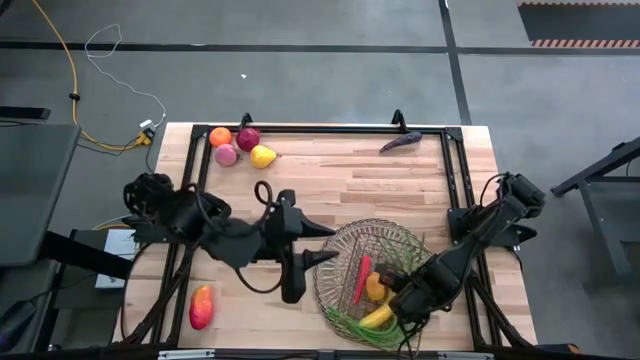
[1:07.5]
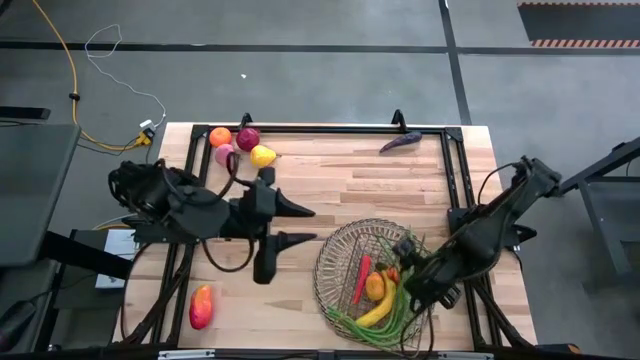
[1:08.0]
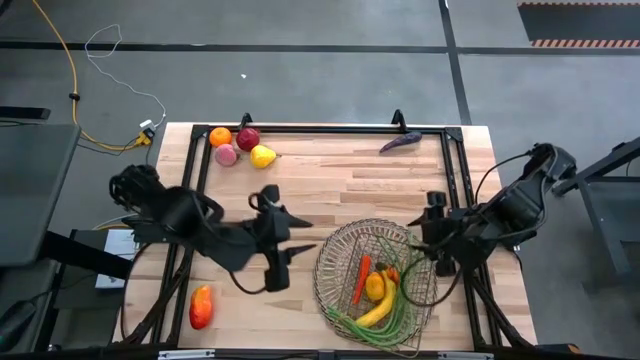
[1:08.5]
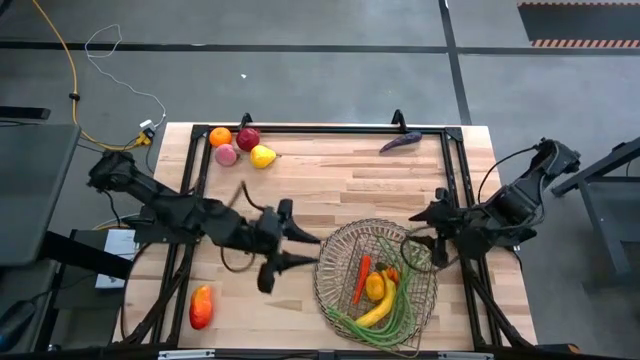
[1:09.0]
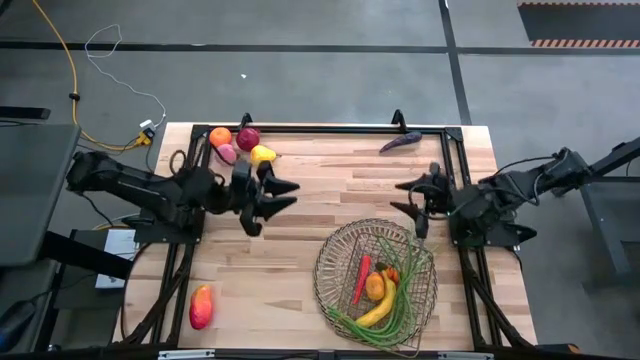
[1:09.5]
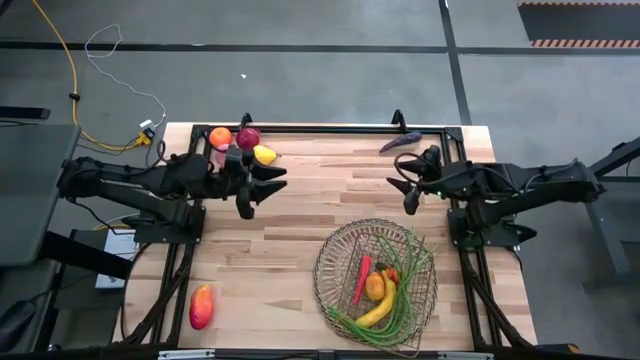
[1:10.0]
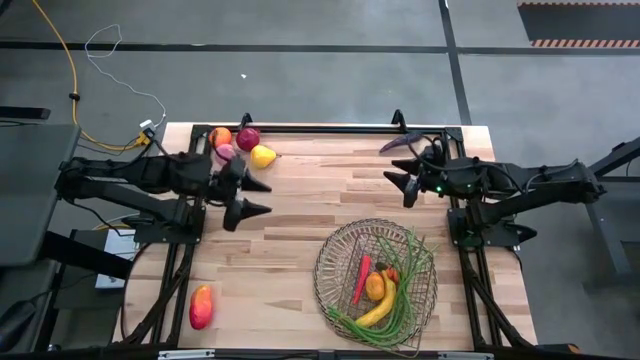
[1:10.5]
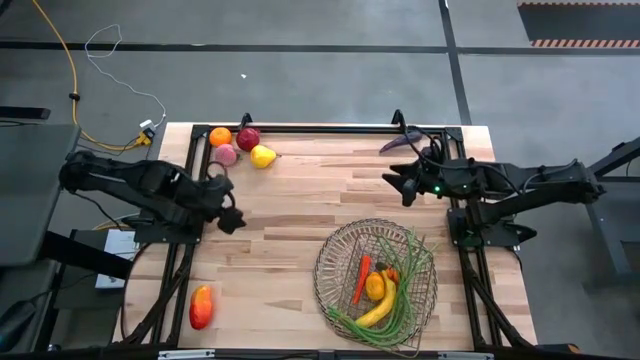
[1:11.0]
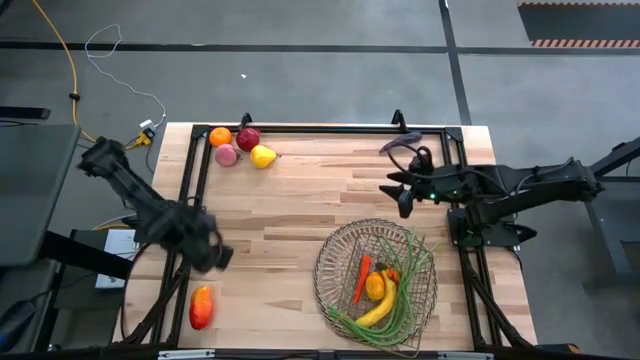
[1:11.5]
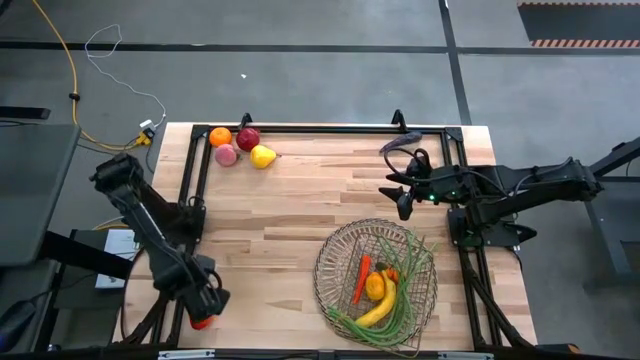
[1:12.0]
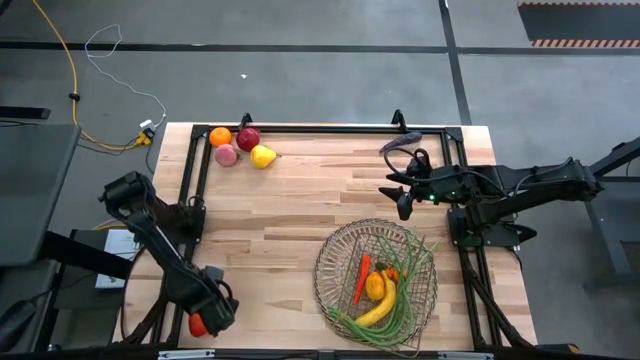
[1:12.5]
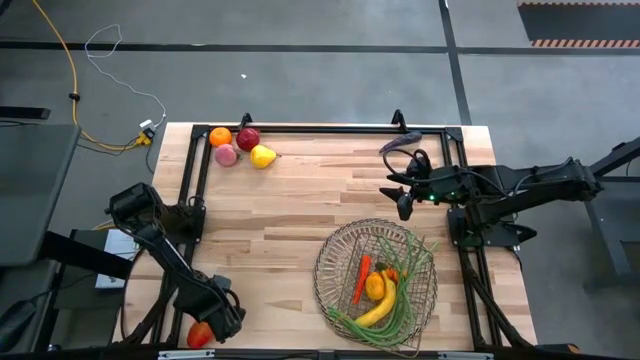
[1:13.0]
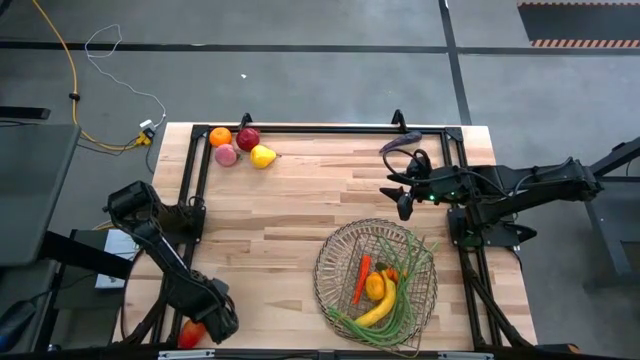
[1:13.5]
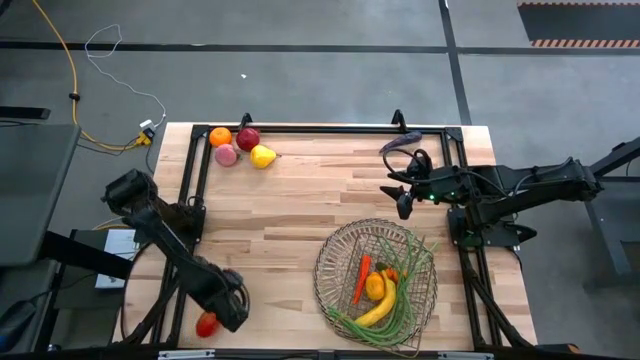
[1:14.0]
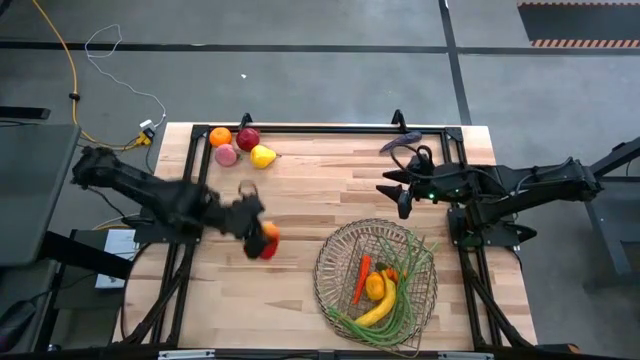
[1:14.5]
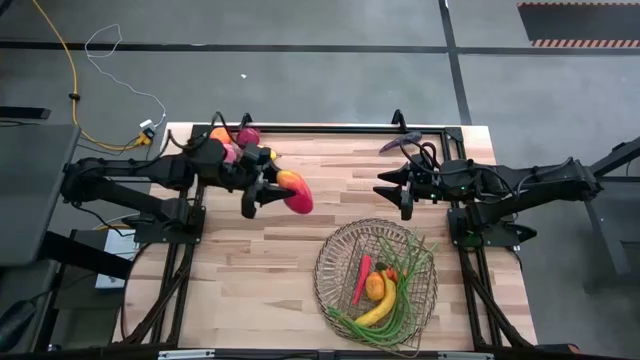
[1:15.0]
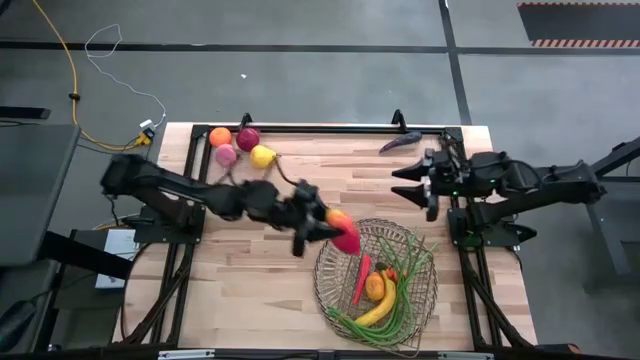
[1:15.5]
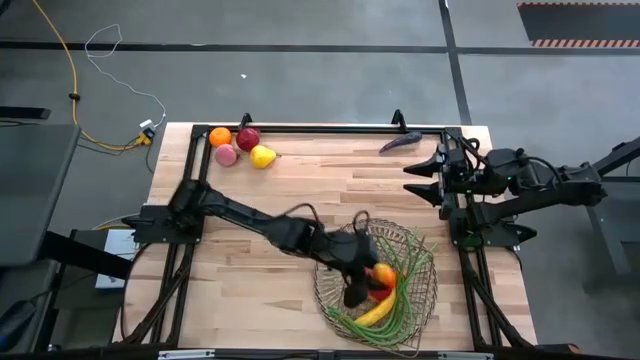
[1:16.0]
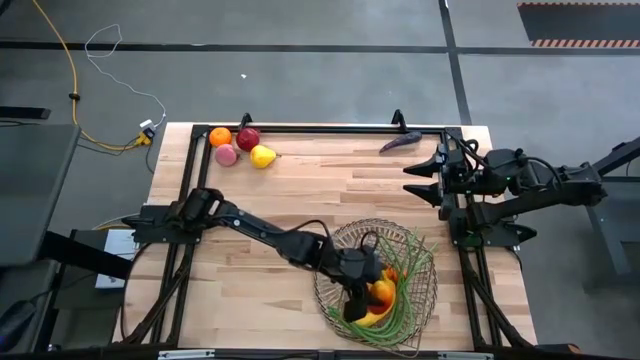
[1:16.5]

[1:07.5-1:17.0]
Task: Build produce basket
Put the mango into the wire basket

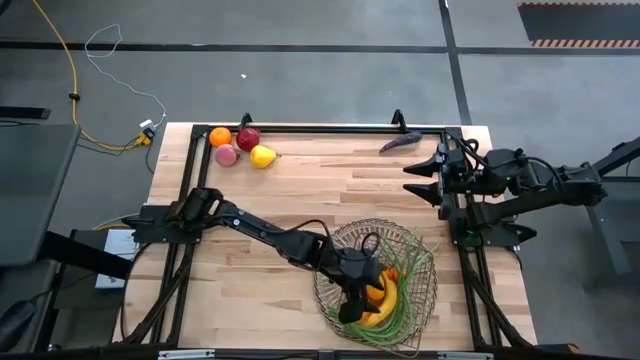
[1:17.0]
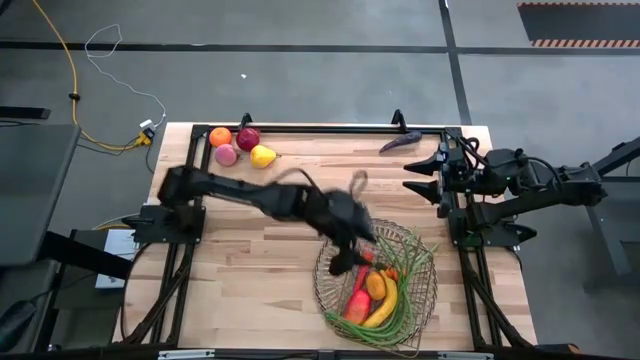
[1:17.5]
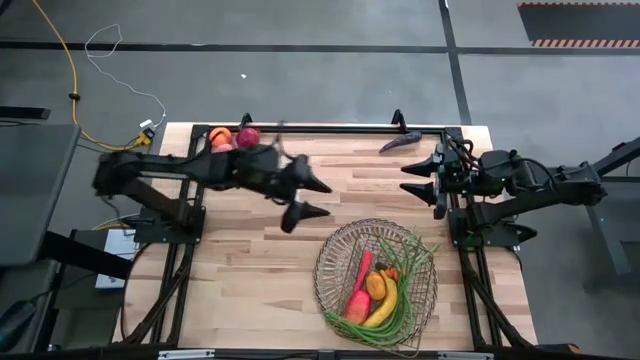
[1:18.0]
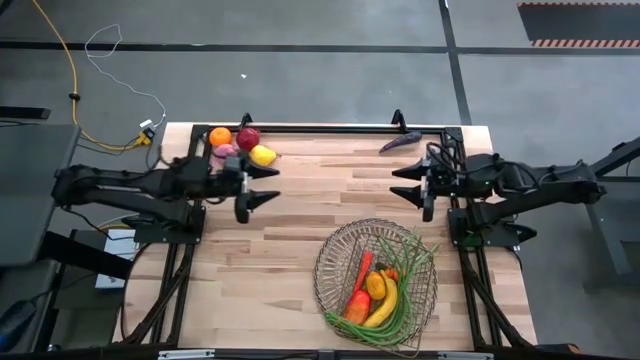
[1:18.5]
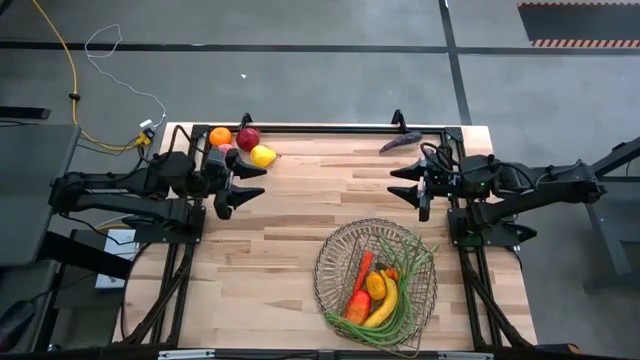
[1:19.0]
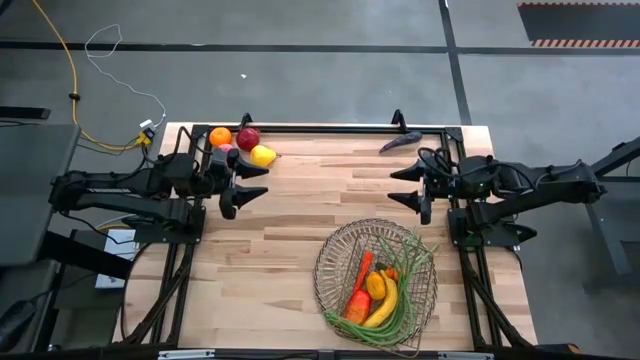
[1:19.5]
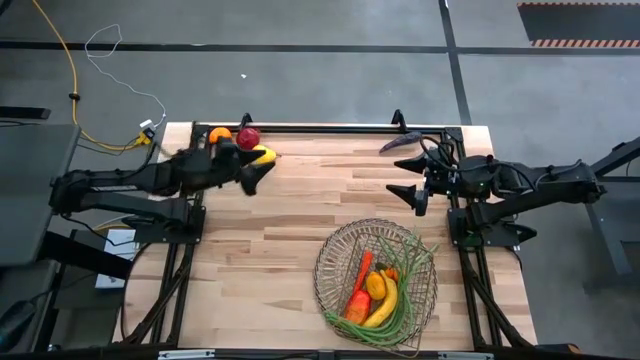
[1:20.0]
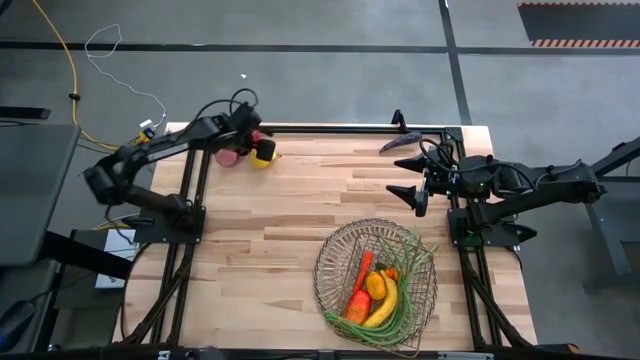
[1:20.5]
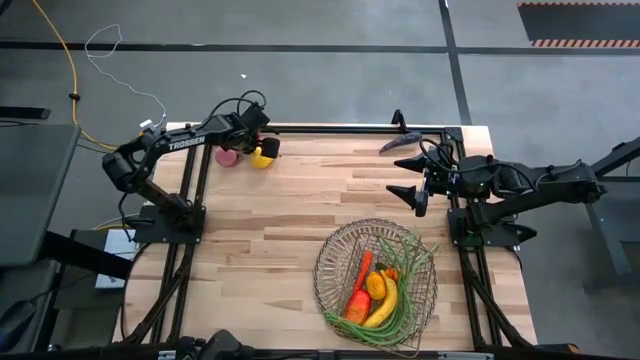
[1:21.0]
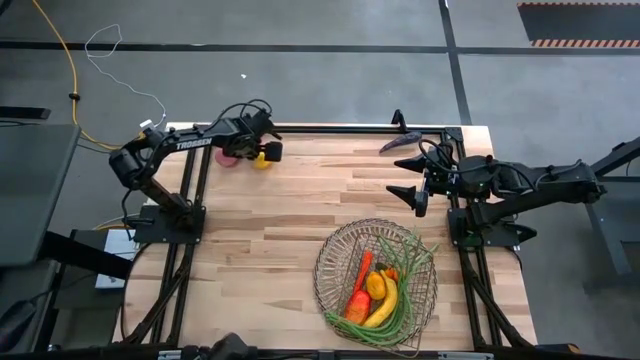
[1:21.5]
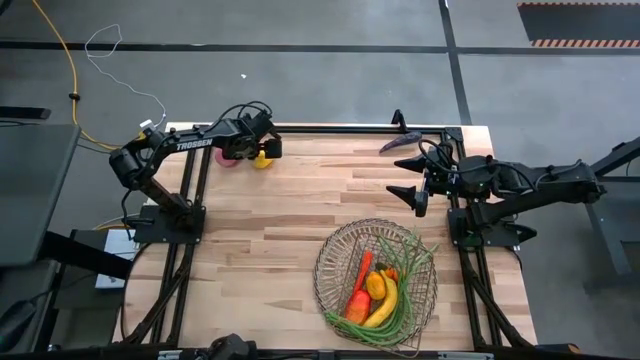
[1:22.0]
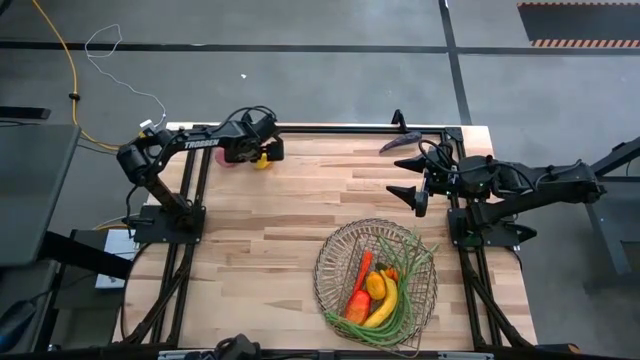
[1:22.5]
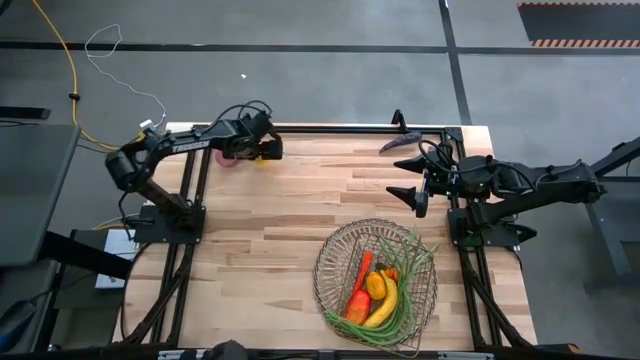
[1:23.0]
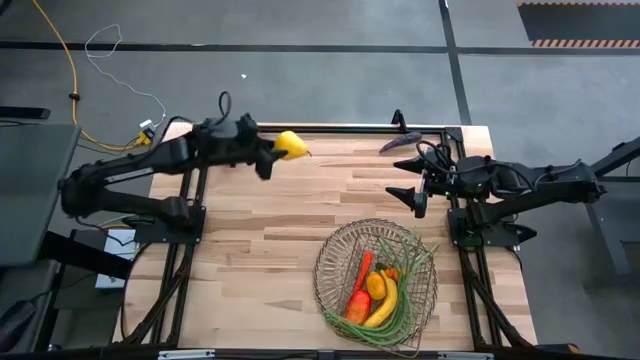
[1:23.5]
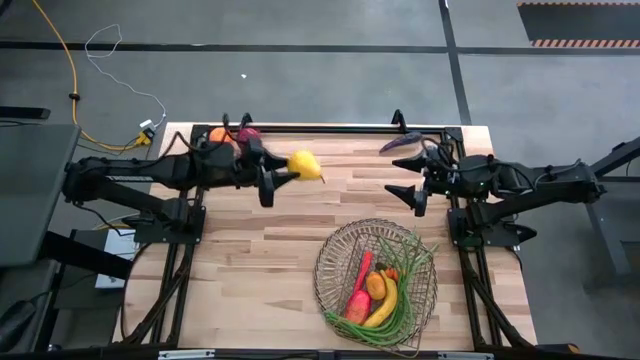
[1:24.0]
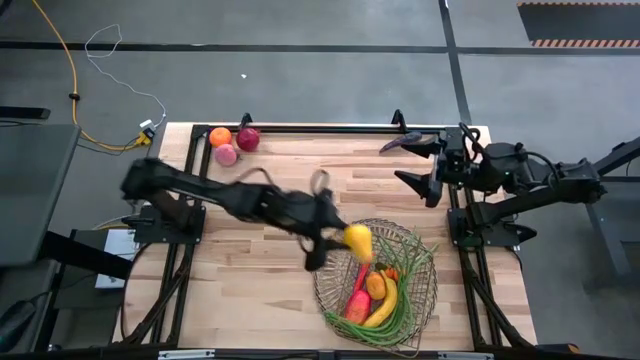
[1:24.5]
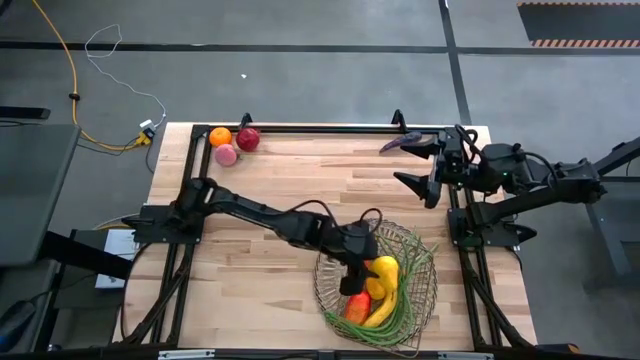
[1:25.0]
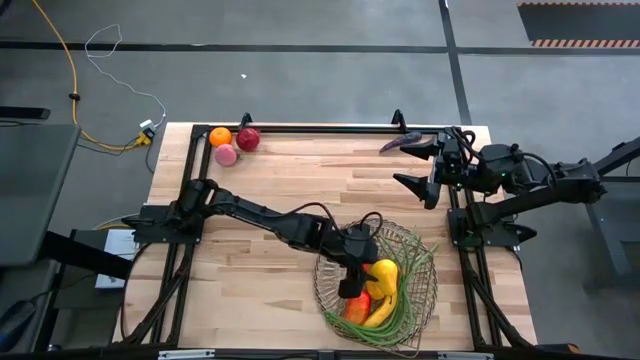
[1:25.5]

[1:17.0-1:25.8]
Put the pear into the wire basket

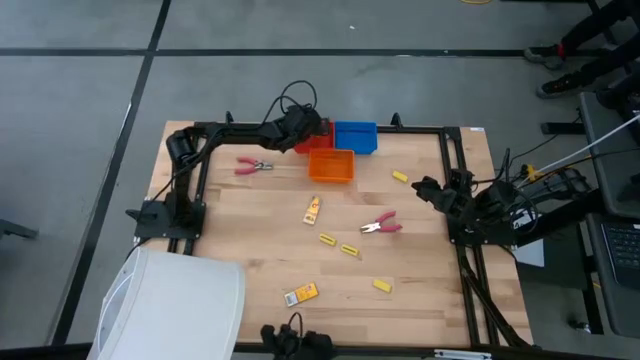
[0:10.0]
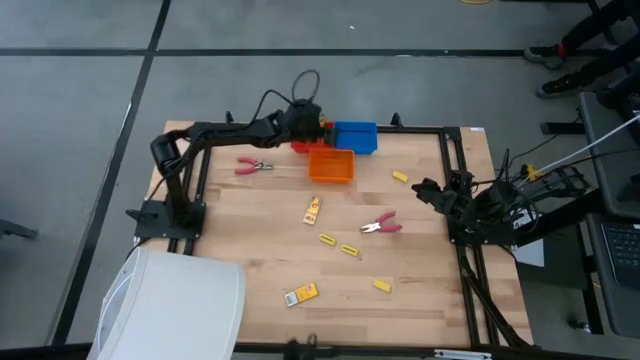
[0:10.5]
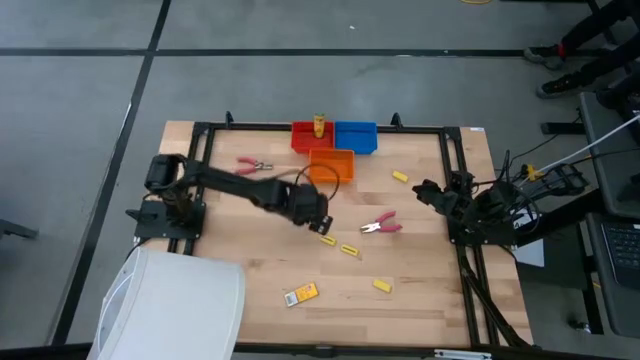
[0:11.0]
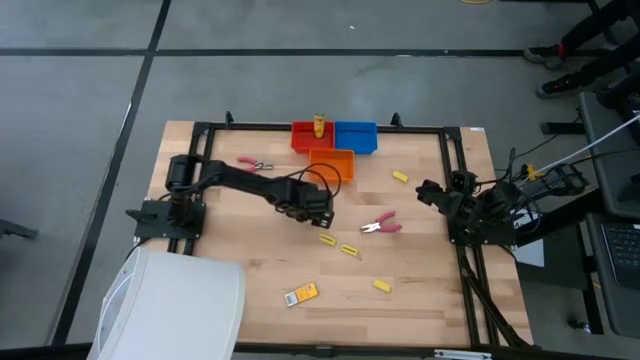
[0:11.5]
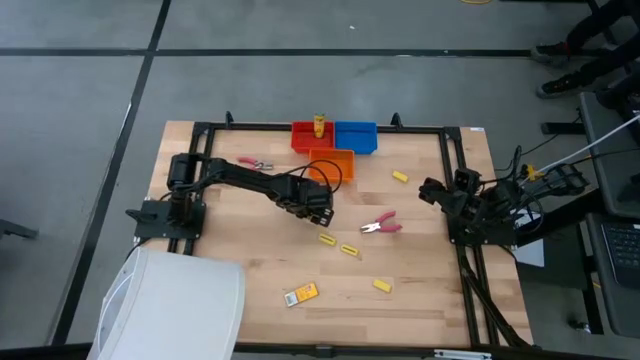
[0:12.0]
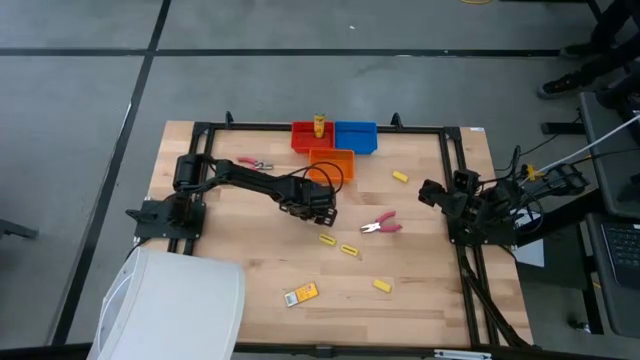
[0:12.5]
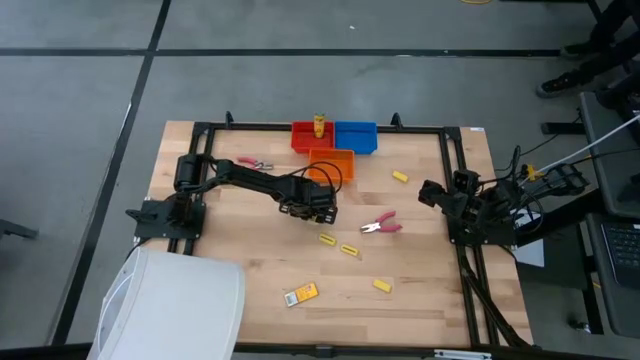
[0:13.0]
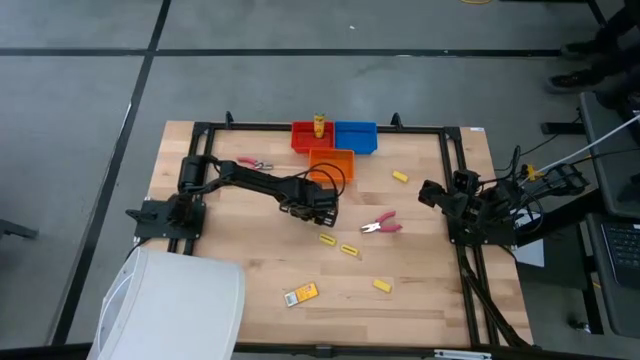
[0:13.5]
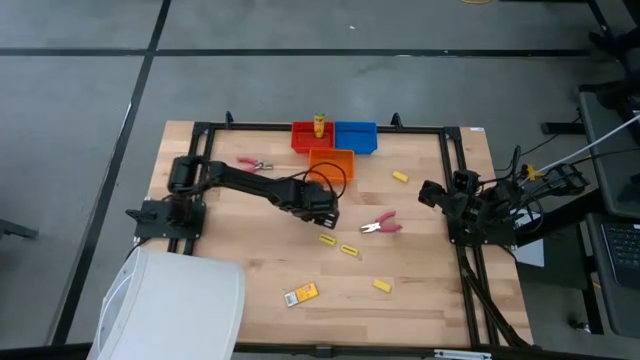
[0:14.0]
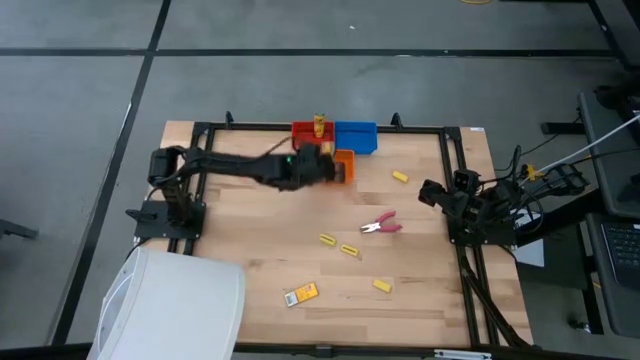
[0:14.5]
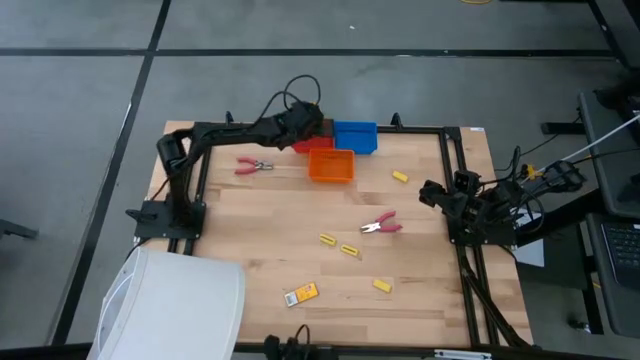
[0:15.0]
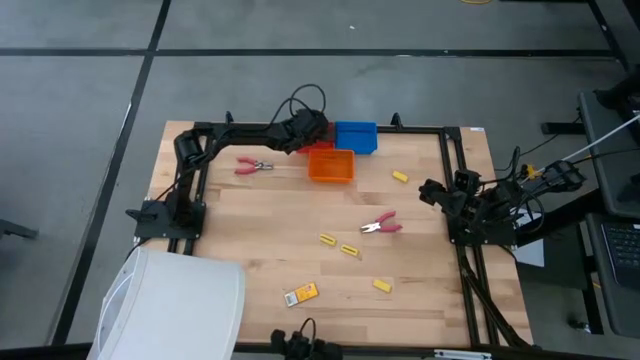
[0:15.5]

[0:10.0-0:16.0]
Task: Pick & Place School Supplies
Put the yellow crayon box into the red bin
